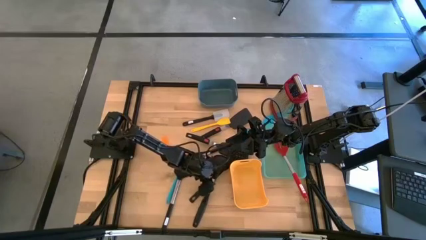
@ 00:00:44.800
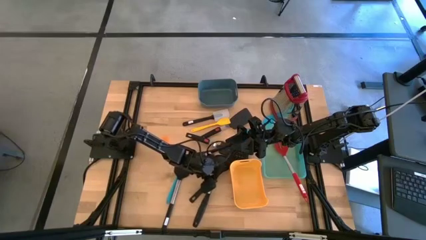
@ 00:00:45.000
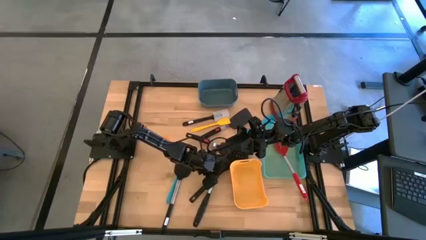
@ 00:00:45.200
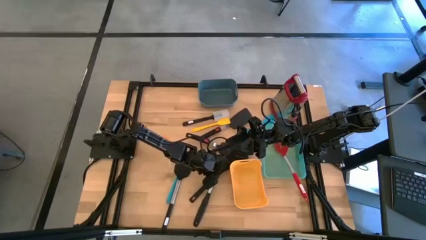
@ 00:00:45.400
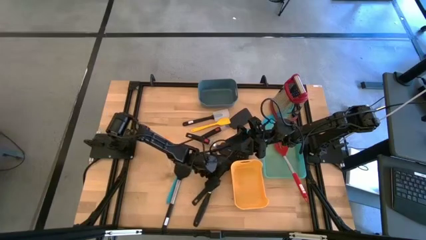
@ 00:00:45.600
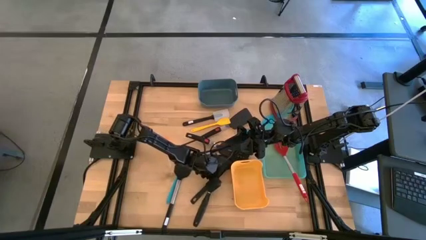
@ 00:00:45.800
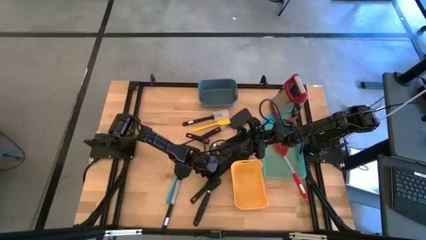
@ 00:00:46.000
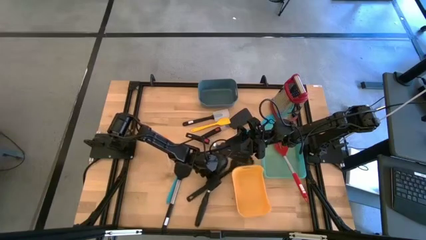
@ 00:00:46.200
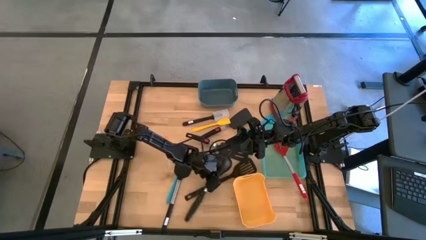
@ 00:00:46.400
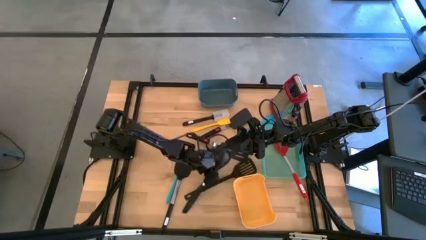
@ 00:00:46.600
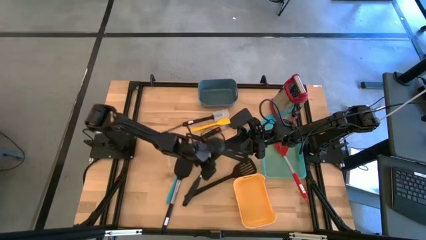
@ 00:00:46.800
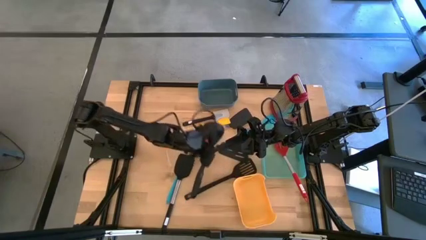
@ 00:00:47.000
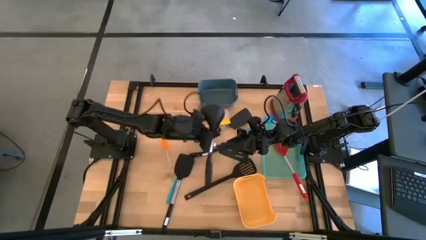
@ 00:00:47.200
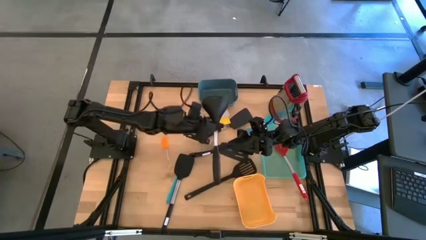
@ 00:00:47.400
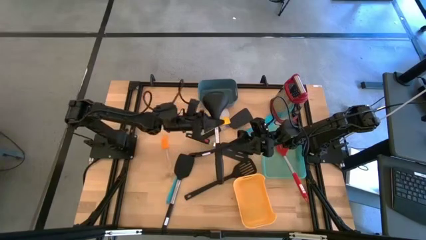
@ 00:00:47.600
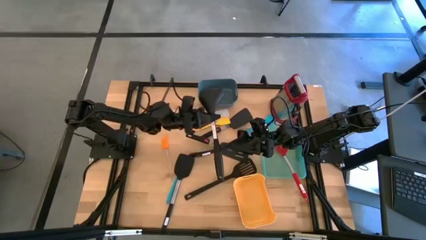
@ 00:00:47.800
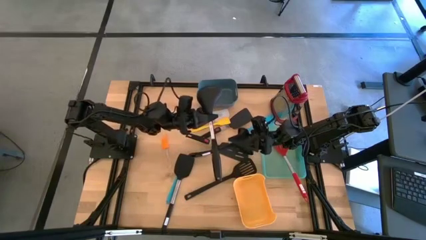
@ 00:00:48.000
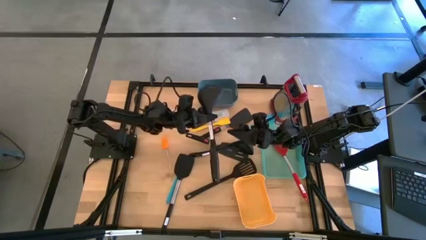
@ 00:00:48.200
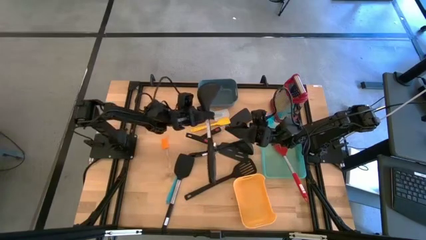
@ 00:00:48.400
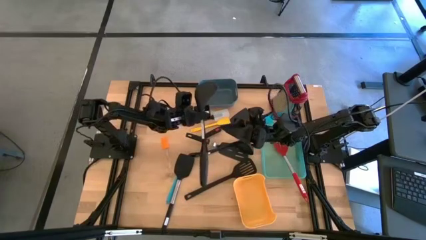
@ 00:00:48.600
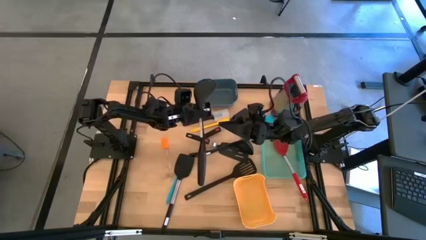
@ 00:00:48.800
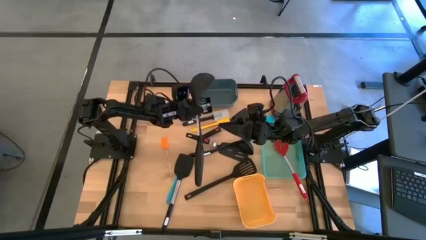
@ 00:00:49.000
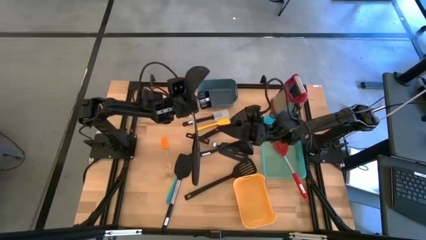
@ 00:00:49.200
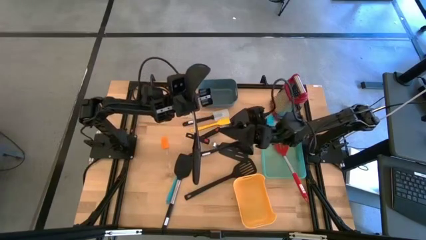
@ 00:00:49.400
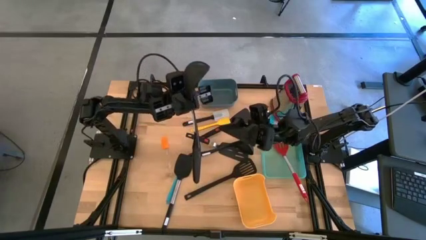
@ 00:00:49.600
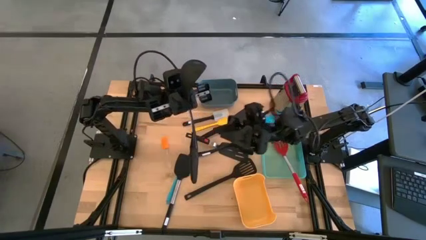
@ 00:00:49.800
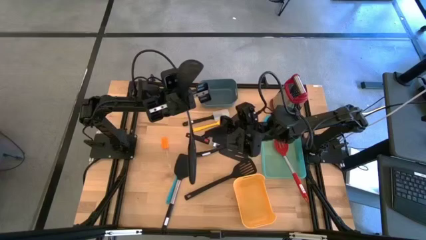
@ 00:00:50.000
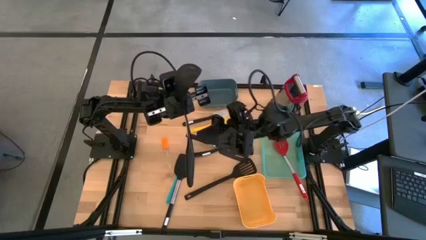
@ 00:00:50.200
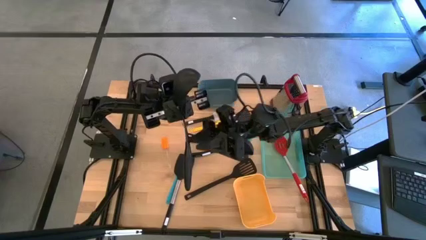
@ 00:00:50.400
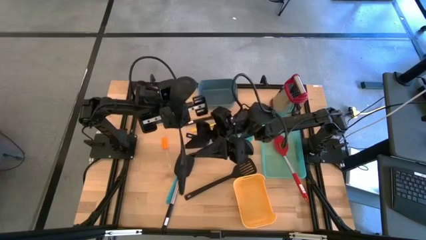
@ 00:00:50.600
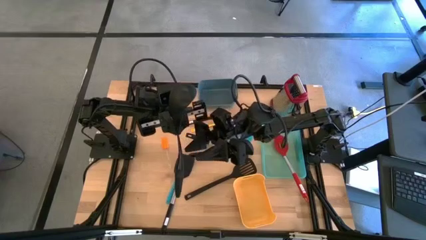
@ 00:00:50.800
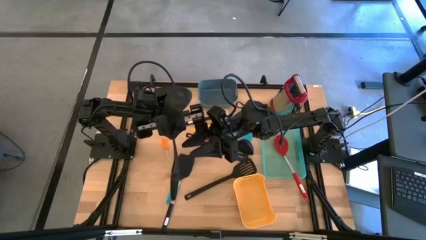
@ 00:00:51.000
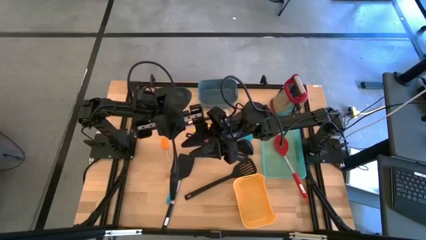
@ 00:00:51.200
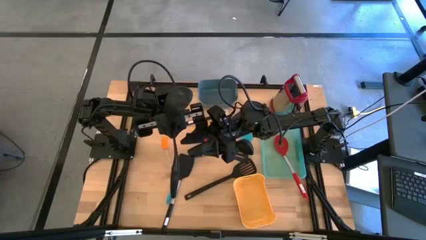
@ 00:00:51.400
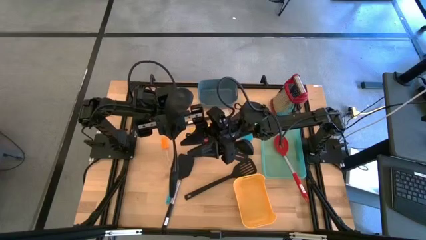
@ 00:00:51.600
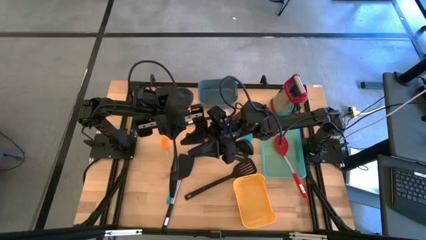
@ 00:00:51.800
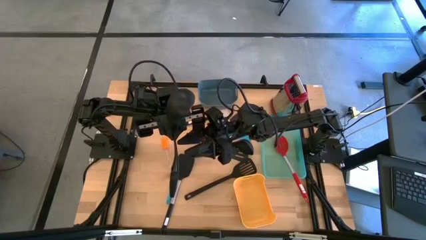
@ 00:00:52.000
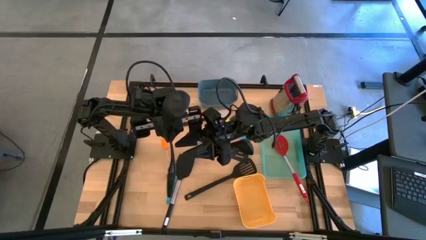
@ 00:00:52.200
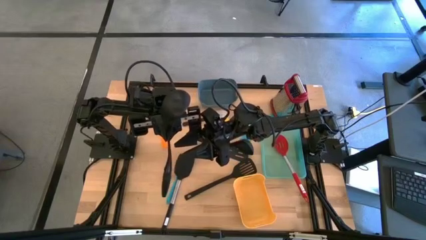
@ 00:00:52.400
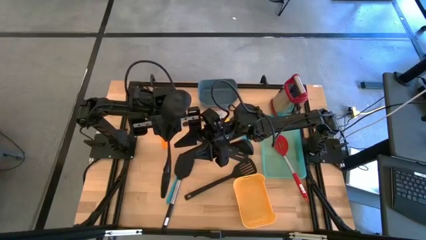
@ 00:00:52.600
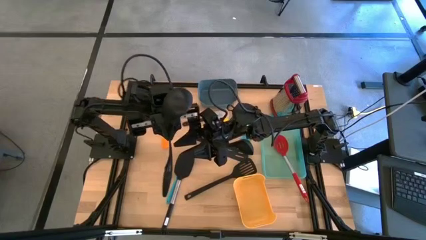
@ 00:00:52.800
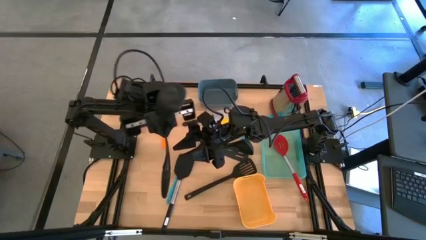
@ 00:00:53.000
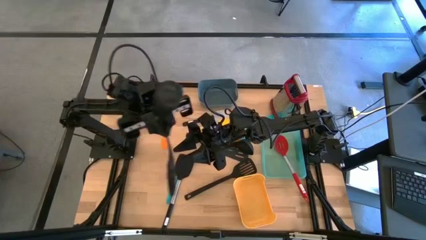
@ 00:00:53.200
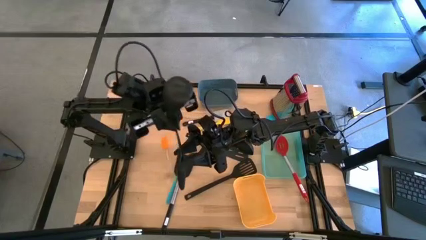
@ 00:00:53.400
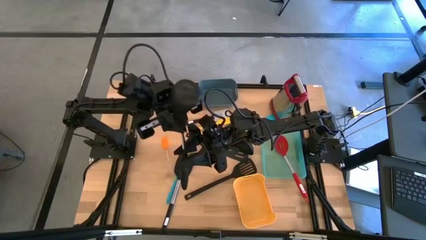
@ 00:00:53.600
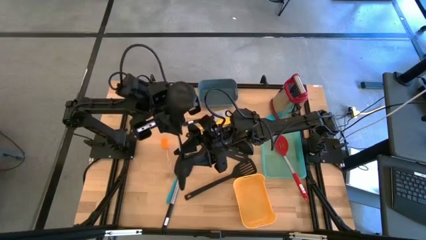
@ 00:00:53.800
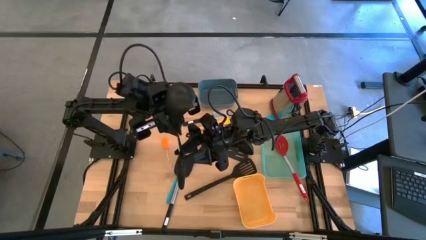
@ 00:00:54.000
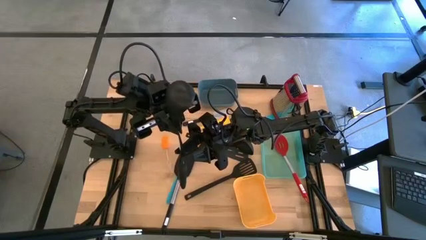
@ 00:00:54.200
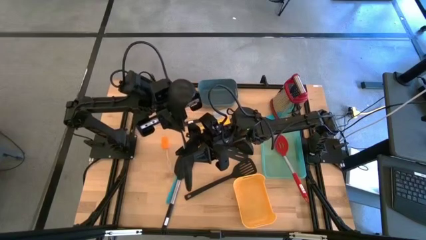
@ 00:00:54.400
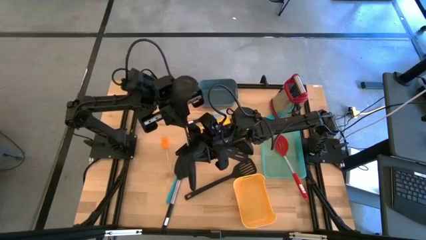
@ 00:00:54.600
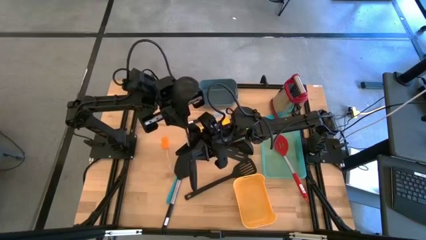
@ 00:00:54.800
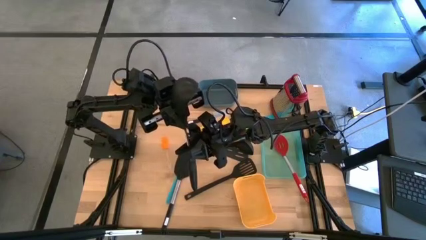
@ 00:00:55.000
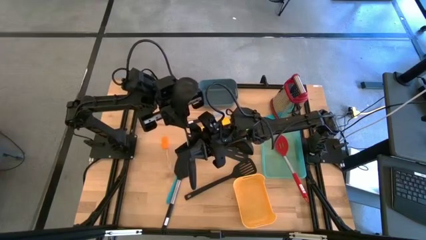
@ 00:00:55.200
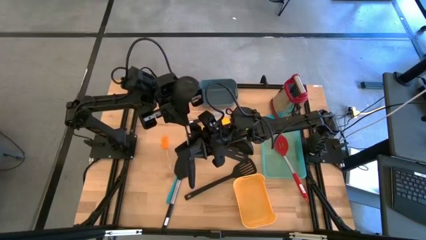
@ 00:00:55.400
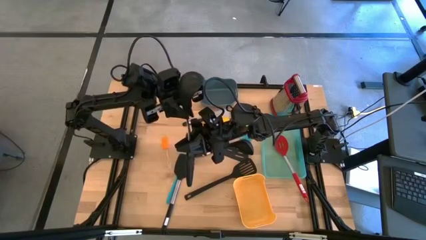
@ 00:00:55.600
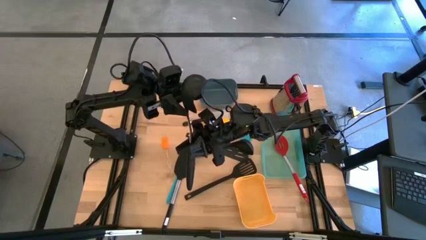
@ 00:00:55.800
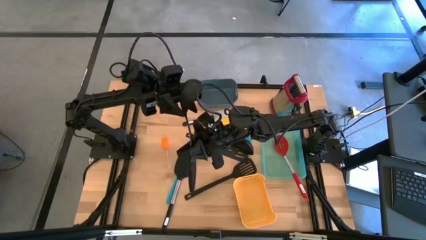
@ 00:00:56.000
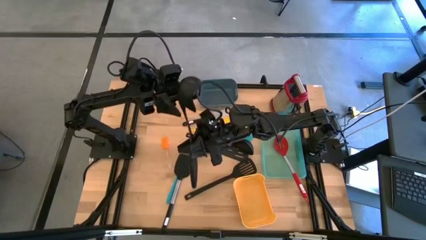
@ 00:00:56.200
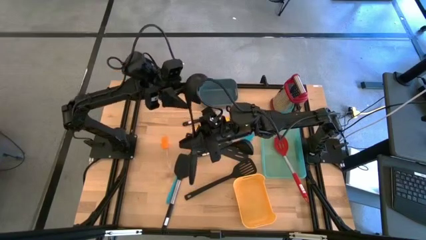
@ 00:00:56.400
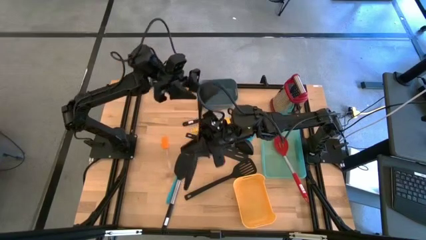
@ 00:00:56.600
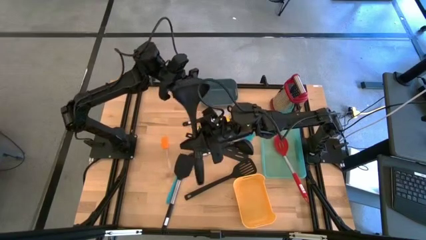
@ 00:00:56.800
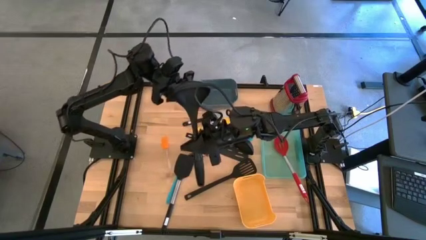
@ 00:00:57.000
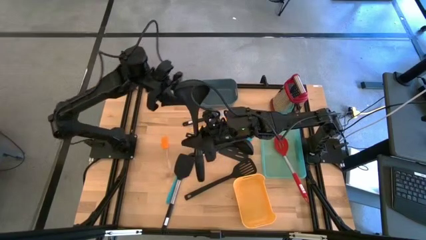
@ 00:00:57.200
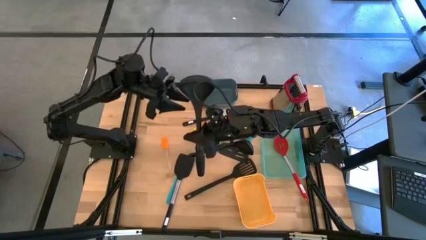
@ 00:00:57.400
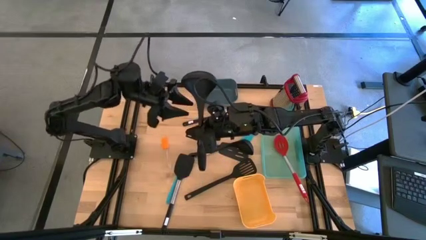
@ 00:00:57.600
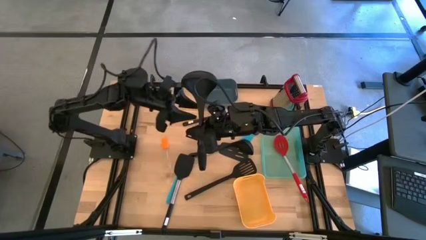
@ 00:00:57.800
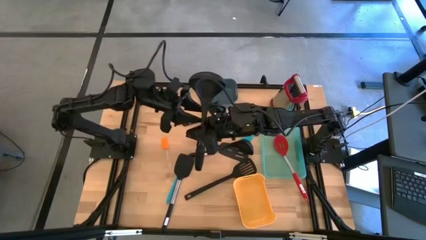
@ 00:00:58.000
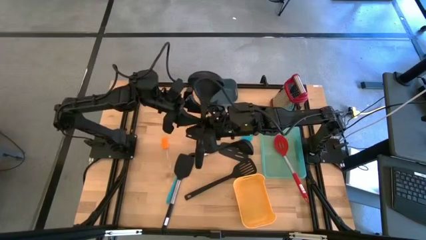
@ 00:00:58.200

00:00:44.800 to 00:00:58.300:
Task: Pick & Place Kitchen Items
Put the black serving spoon into the green bin
